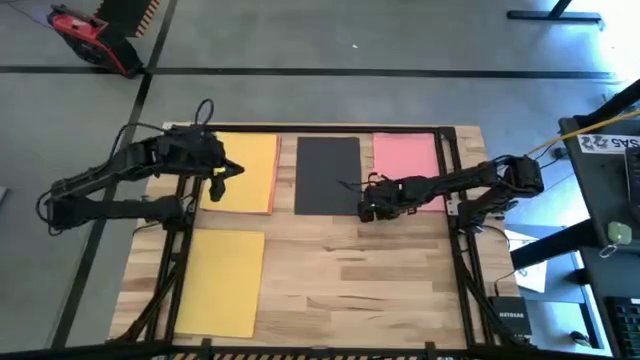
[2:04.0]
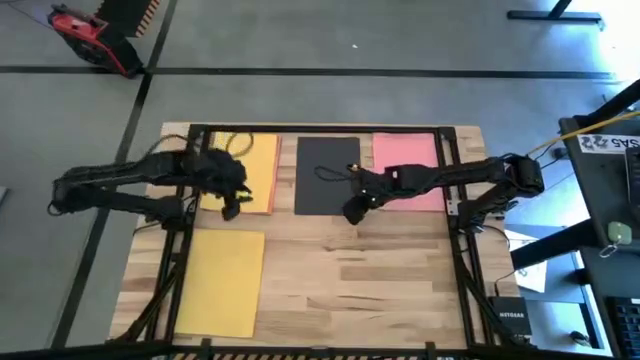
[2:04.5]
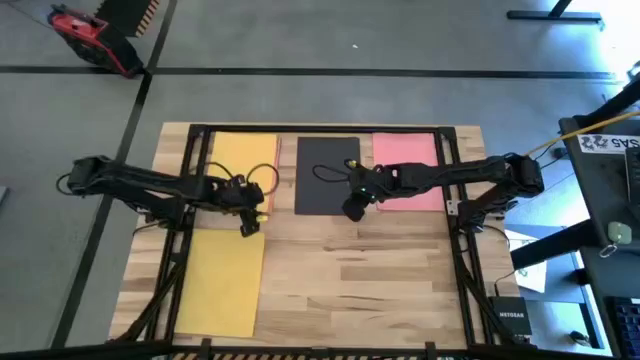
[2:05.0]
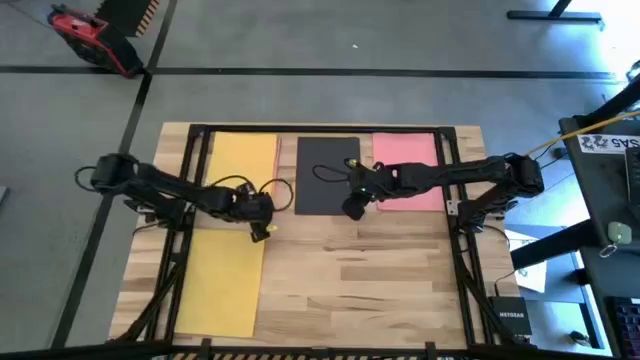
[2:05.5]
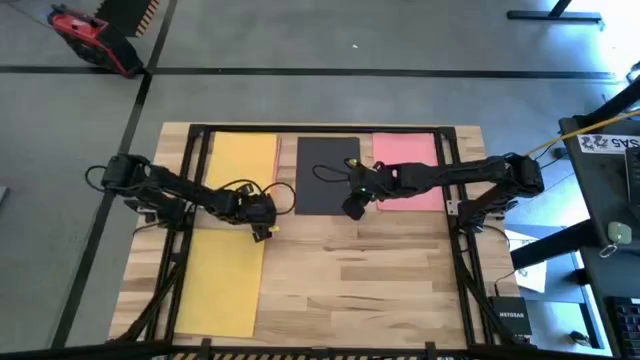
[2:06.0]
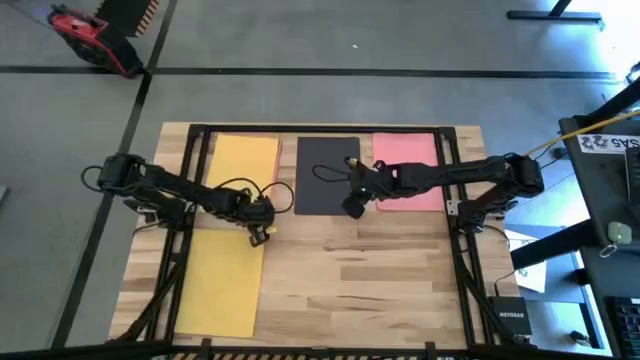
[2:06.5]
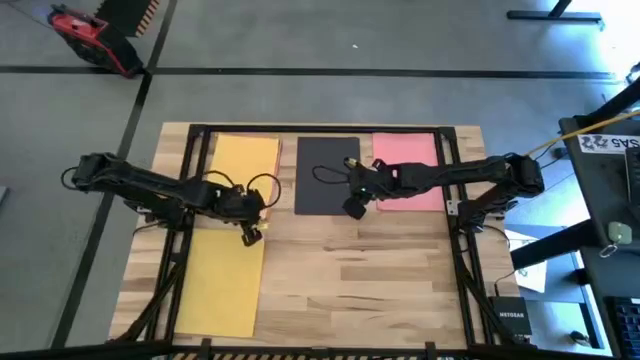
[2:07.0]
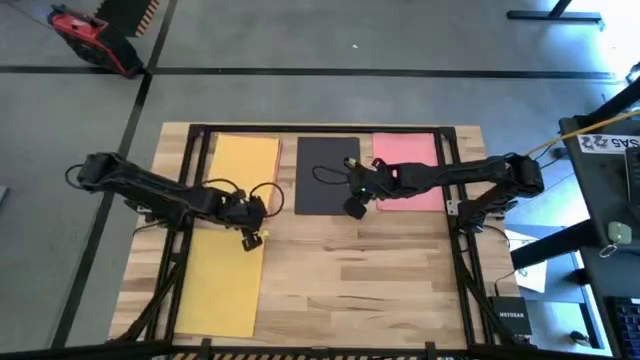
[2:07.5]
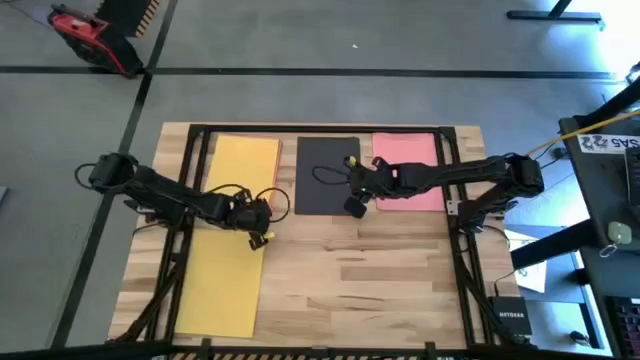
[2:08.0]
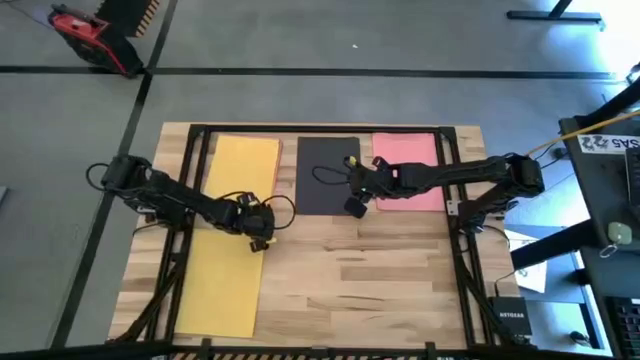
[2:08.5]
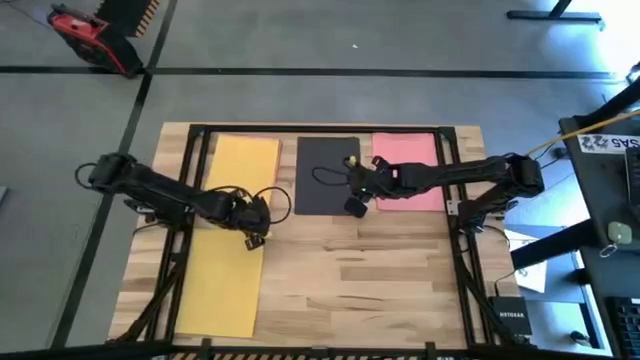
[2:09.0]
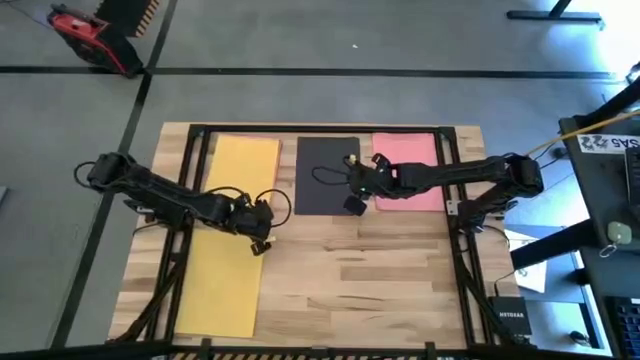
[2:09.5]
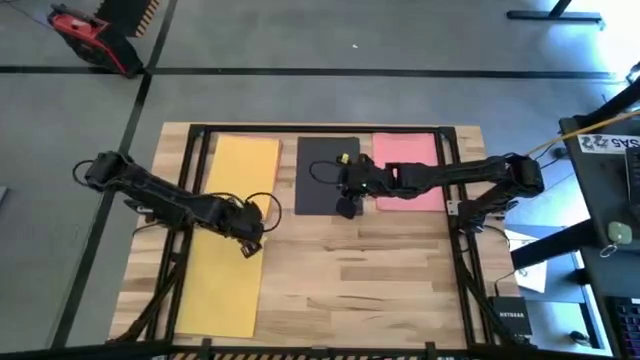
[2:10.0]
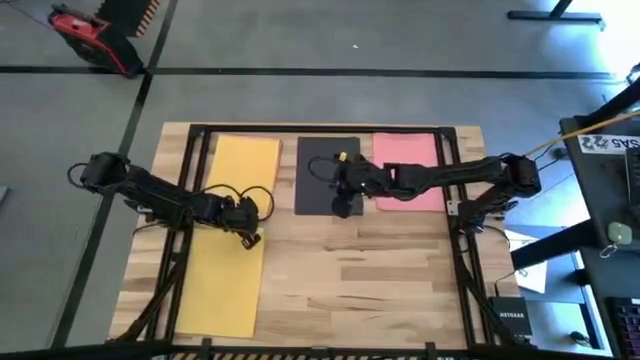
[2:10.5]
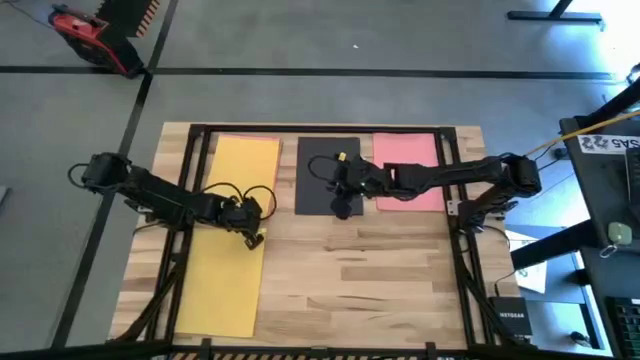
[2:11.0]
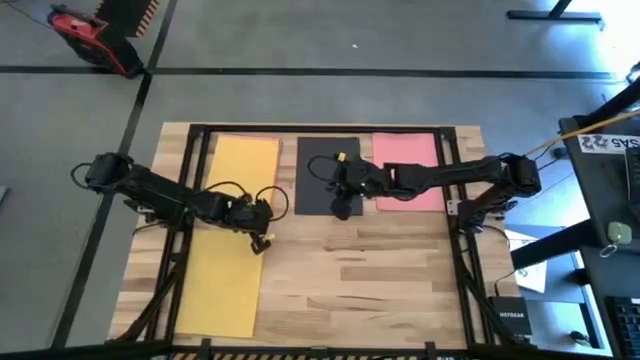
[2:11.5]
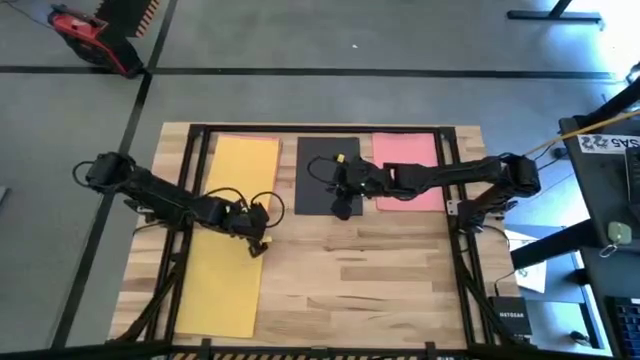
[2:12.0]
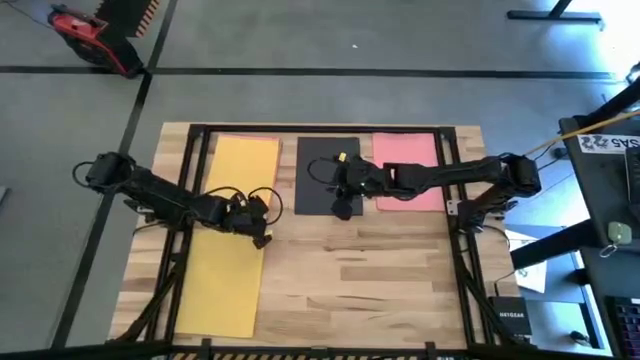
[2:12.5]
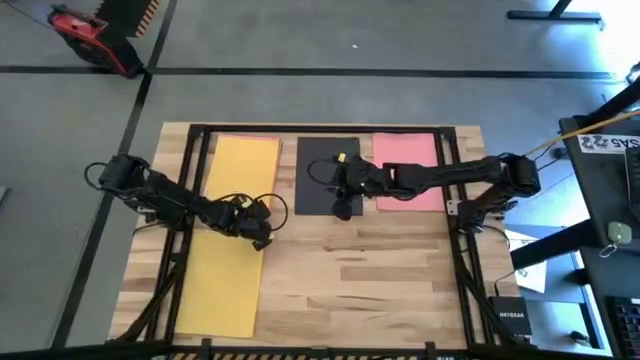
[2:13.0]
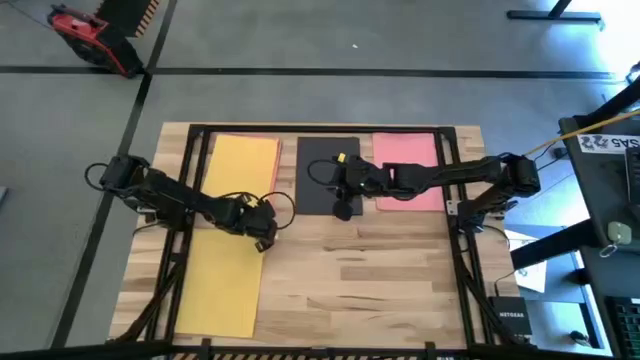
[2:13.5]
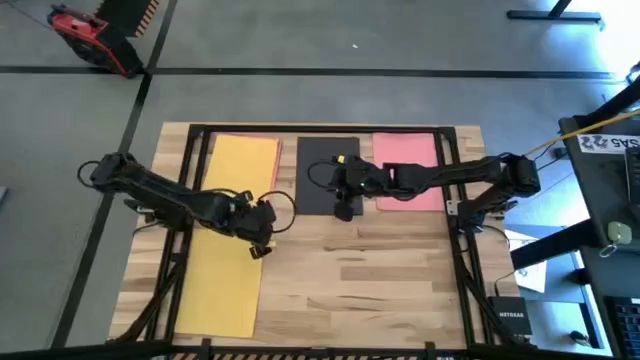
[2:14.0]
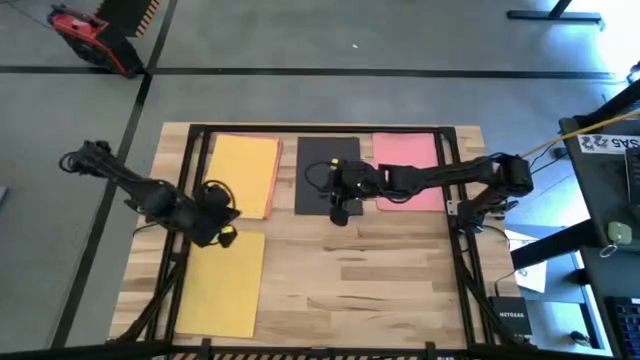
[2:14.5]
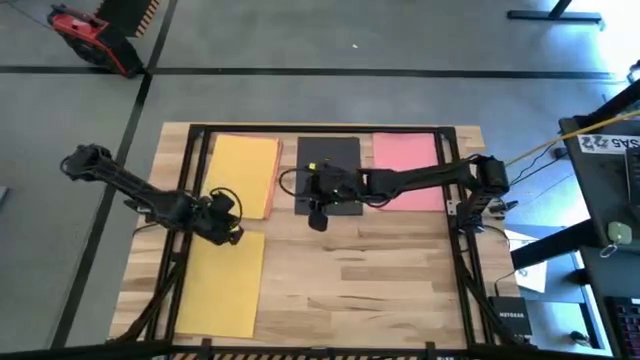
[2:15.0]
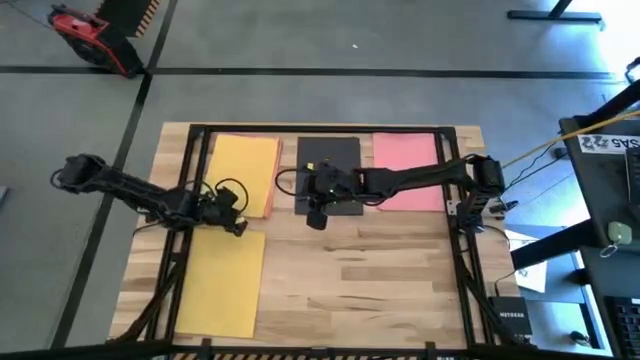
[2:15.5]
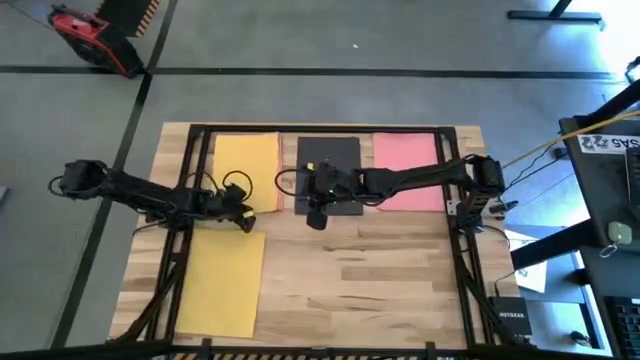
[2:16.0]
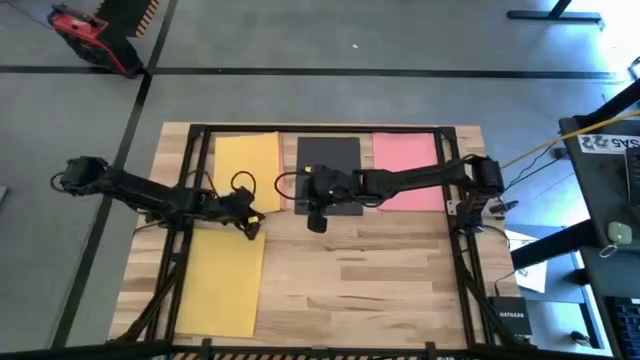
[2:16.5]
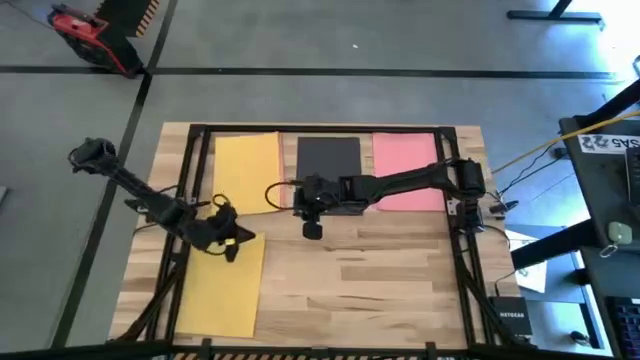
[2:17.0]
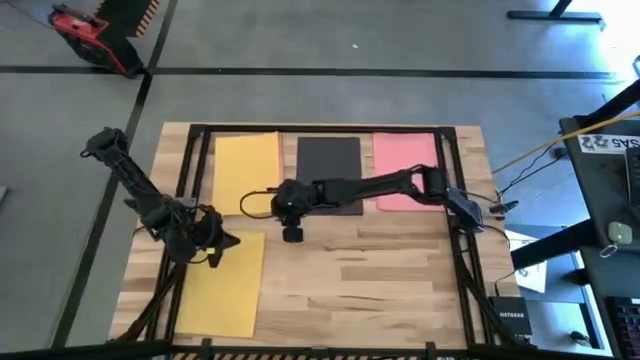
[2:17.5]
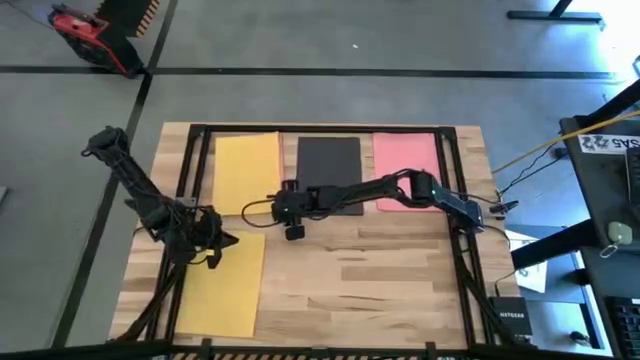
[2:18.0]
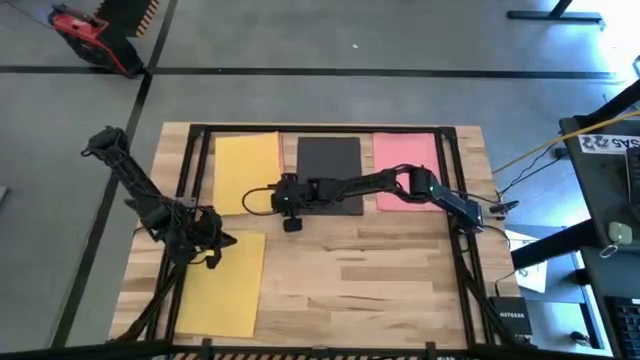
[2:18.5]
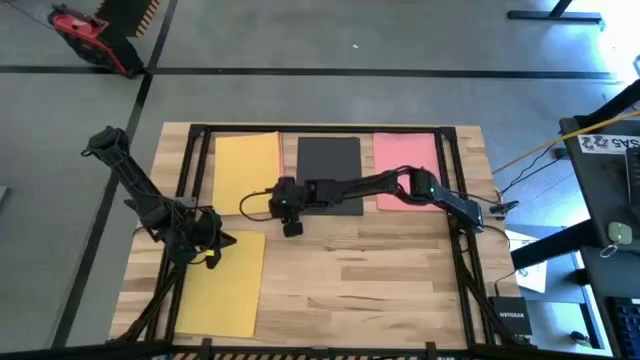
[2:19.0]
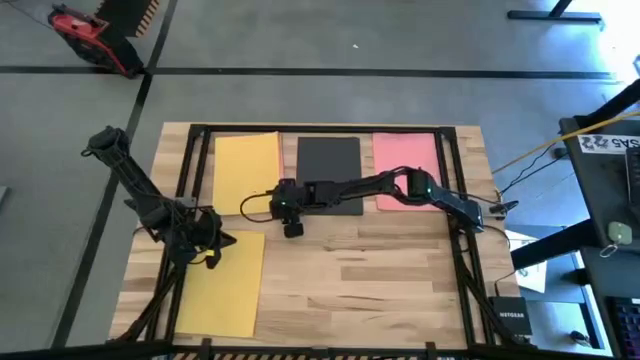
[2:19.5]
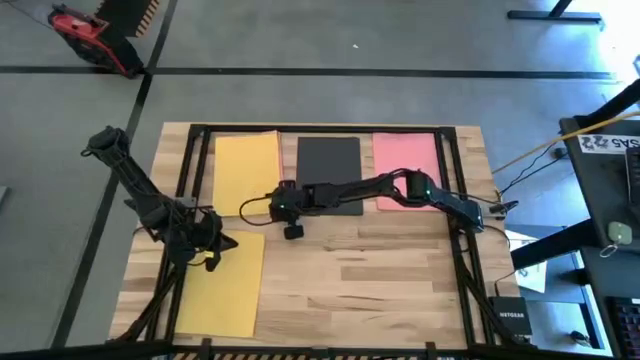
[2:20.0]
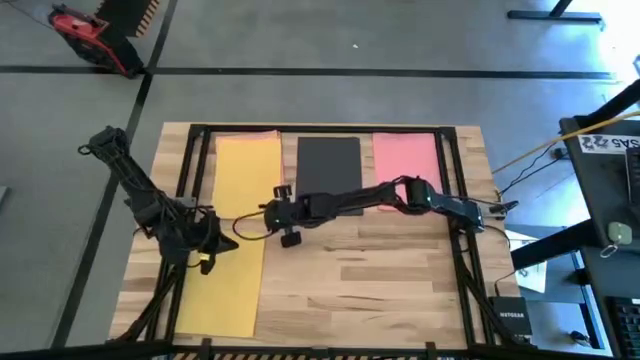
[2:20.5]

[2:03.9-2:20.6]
Task: Organize paper
Stack the yellow paper on top of the stacked yellow papers

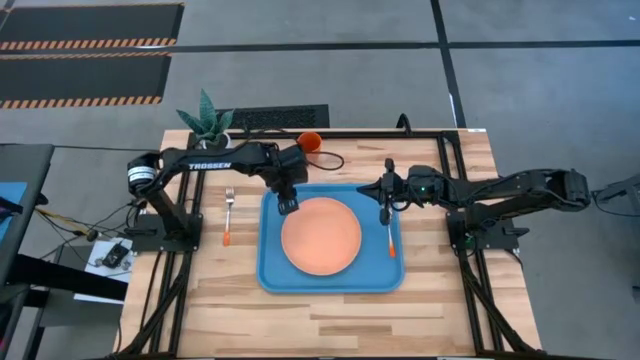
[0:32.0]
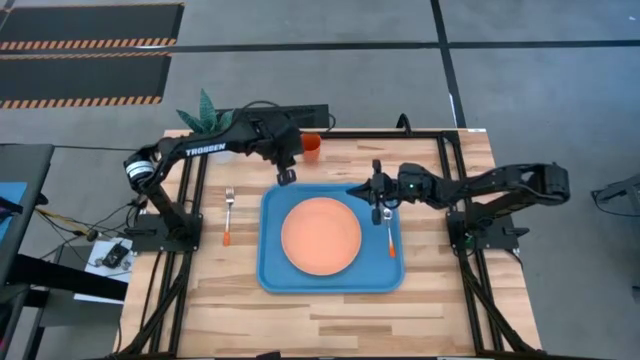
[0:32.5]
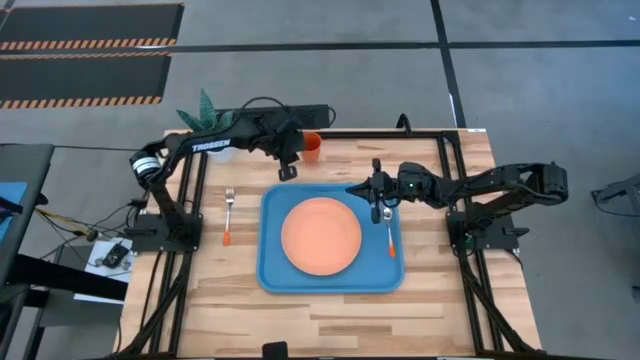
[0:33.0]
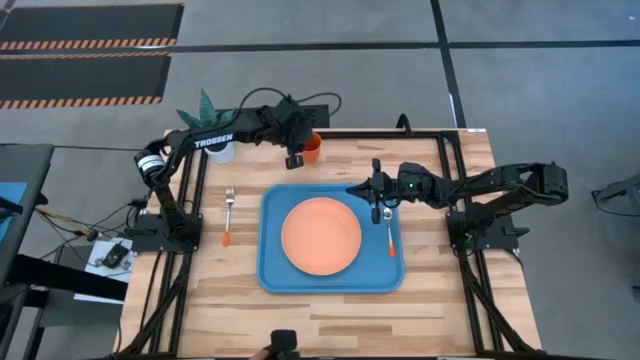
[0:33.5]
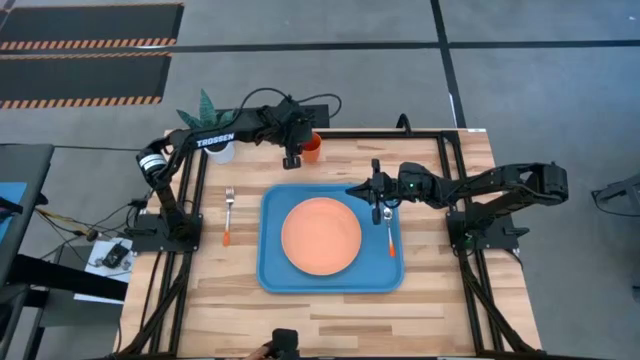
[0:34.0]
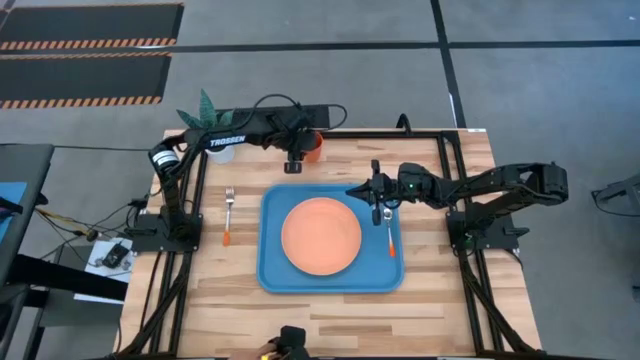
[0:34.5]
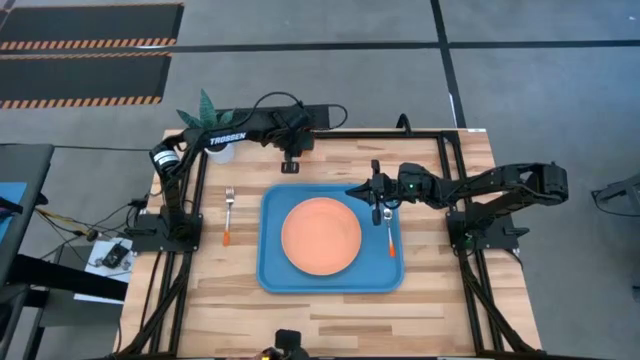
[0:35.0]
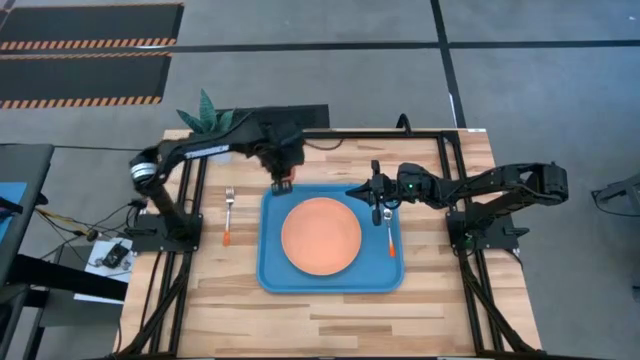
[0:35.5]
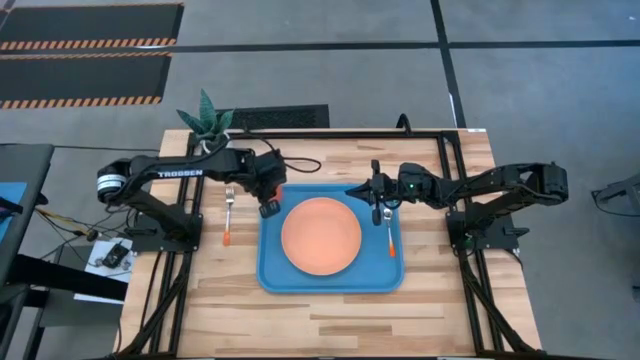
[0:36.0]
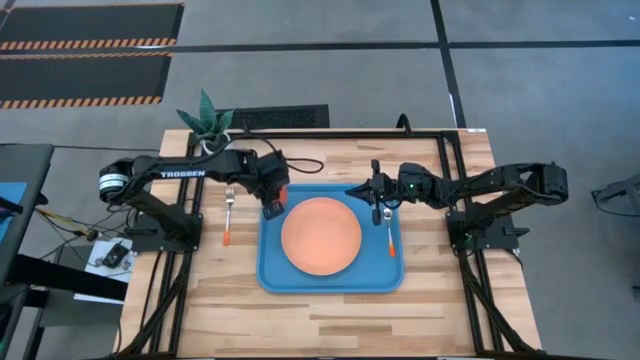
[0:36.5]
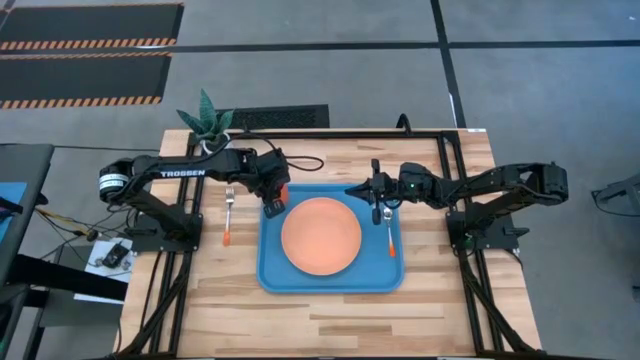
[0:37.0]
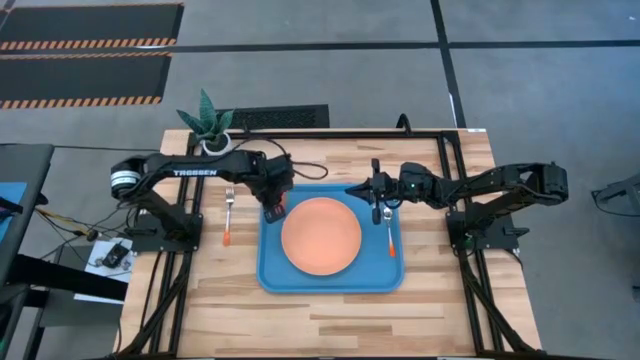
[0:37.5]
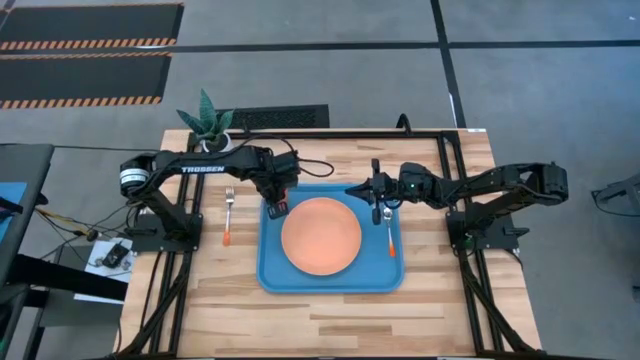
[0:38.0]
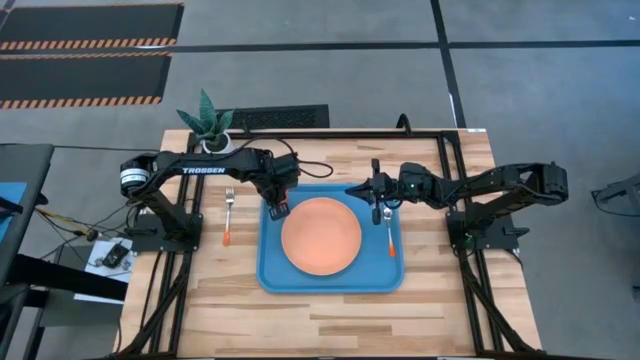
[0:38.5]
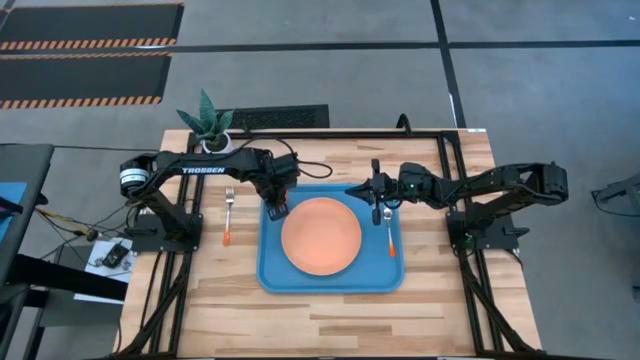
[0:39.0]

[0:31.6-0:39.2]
Task: Pick and place plate/cup/fork/spoon on tray
Put the orange cup on the blue tray above the orange plate
